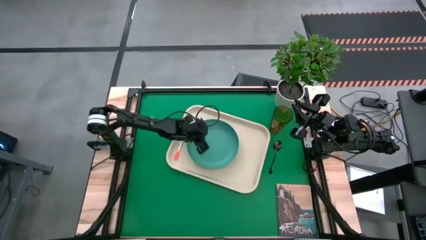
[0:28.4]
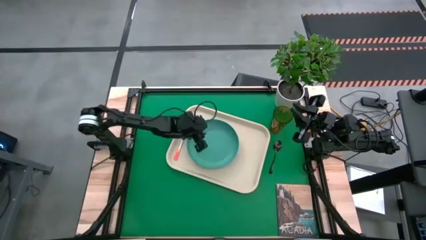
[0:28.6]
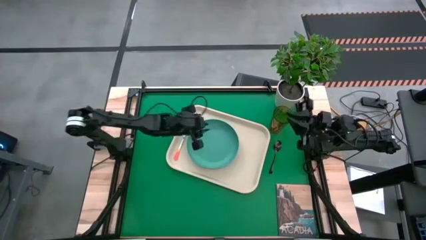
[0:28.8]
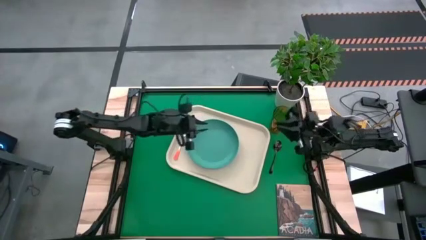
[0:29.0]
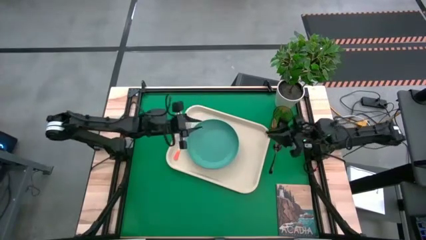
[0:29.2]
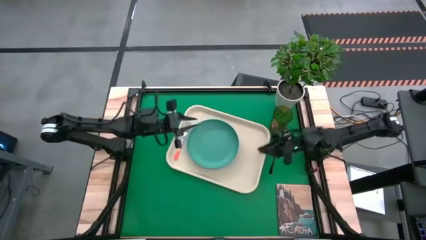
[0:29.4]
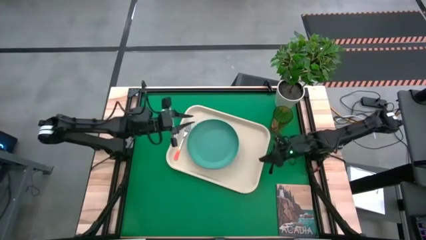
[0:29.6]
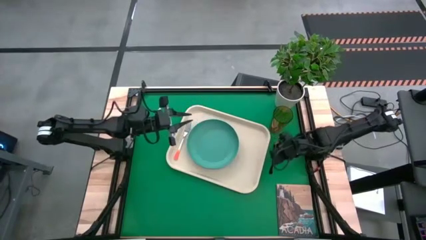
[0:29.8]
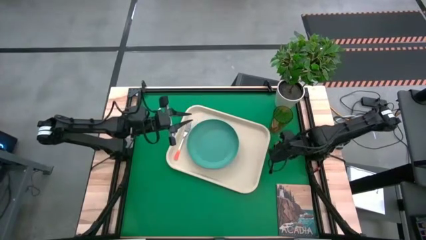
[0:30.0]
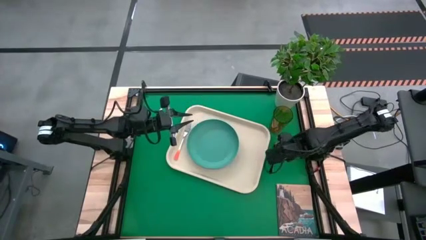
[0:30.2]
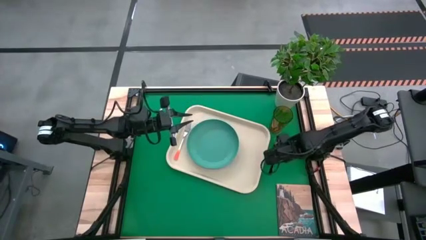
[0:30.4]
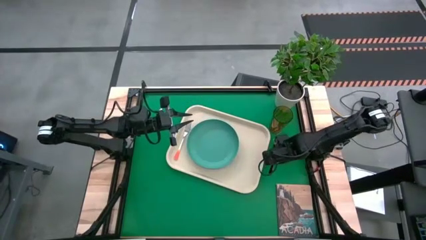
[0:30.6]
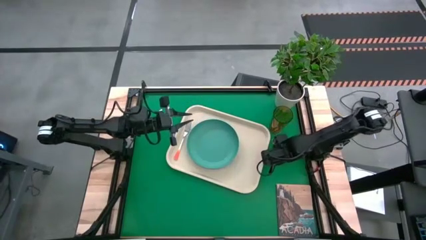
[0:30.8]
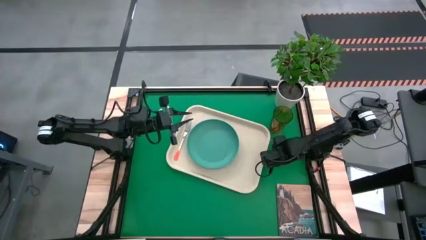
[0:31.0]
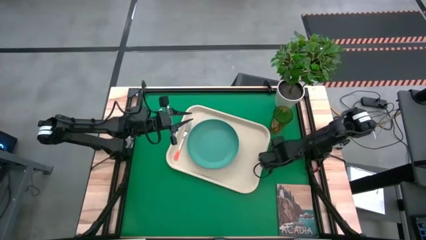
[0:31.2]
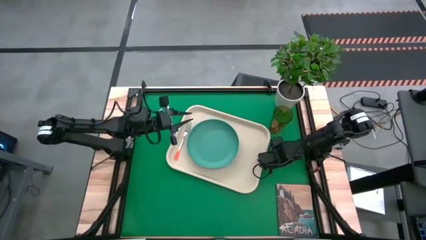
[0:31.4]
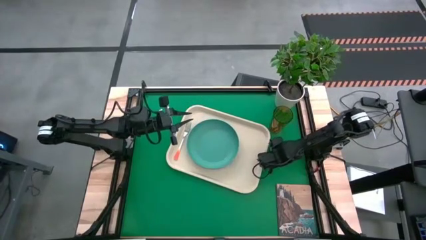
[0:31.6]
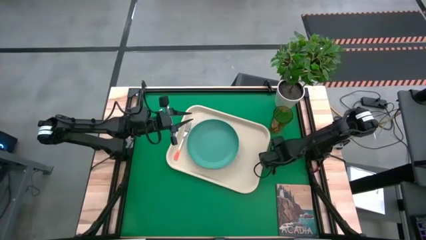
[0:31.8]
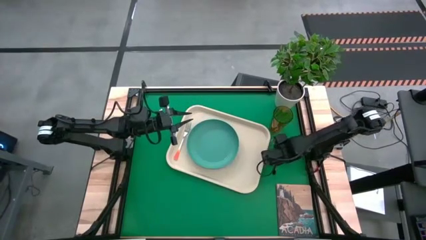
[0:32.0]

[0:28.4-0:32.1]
Task: Pick and place plate/cup/fork/spoon on tray
Put the black spoon on the white tray to the right of the green plate

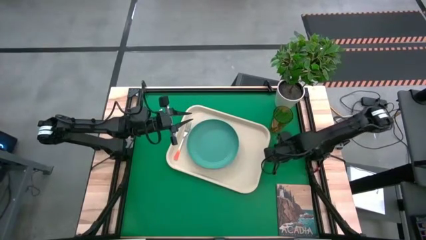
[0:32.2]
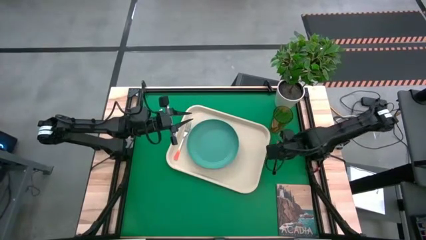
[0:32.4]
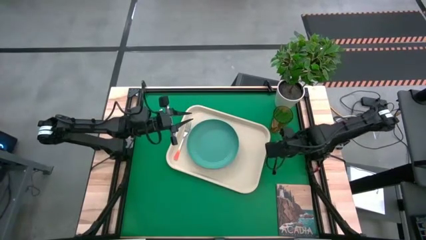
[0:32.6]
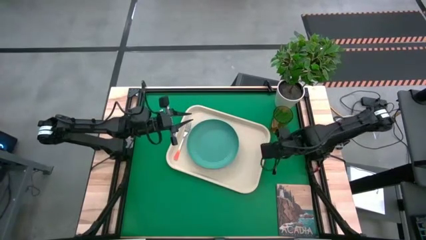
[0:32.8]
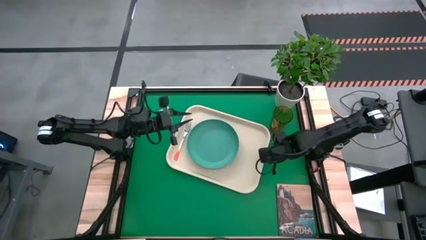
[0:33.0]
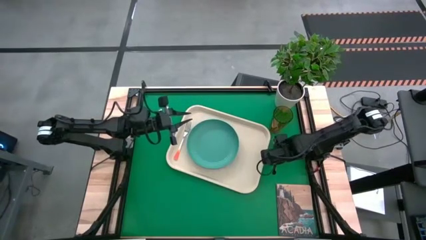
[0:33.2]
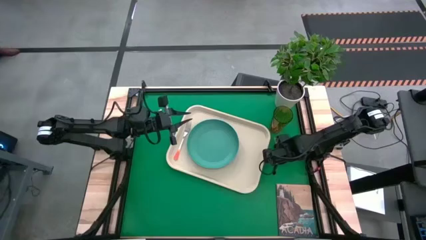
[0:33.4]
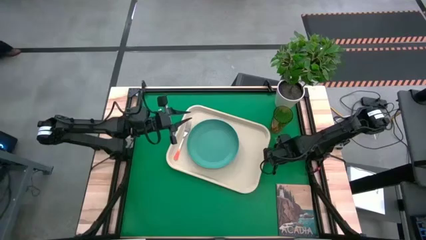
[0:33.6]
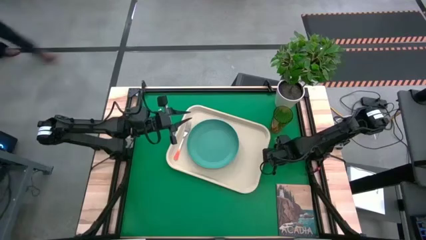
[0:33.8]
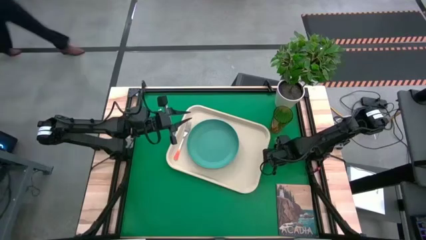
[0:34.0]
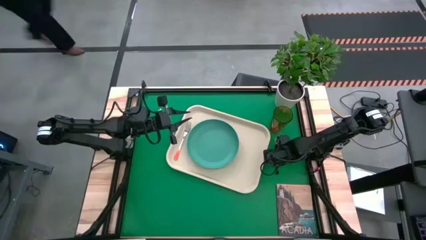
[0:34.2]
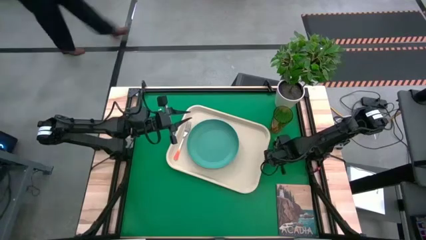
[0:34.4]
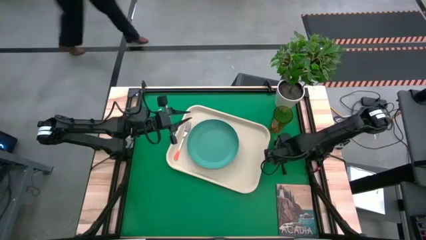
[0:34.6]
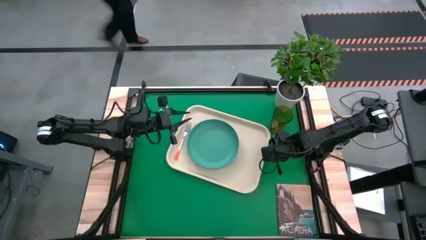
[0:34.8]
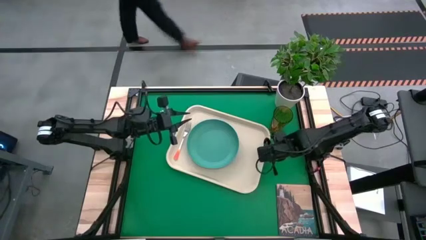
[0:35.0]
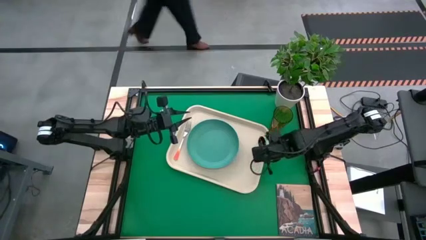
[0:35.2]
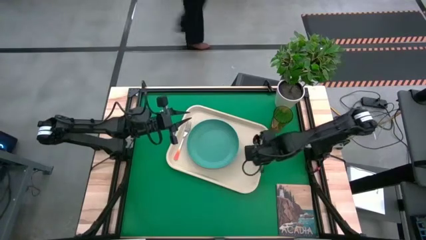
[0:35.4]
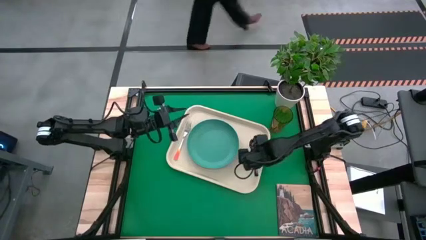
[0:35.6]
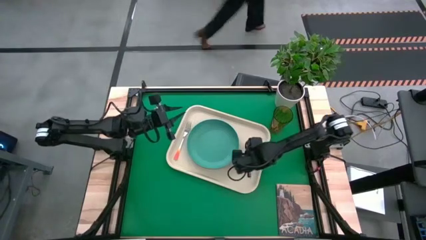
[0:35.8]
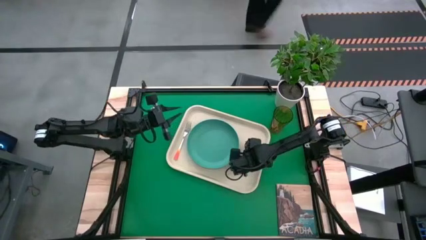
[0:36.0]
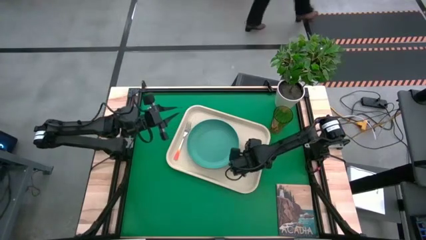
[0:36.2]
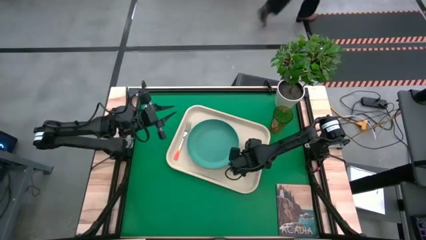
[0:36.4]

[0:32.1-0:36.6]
Put the black spoon on the white tray to the right of the green plate

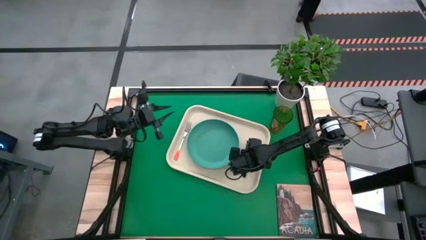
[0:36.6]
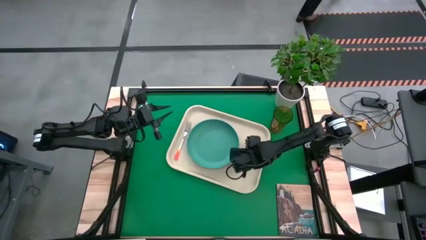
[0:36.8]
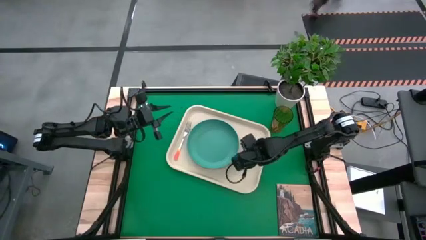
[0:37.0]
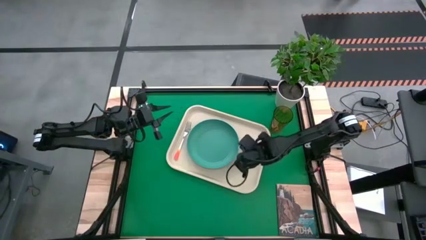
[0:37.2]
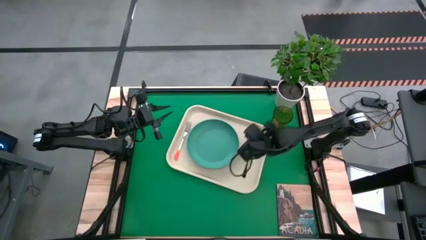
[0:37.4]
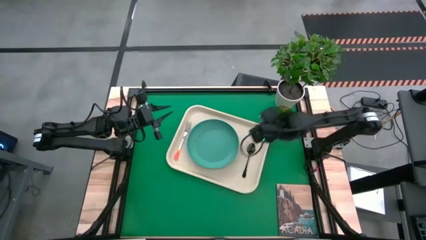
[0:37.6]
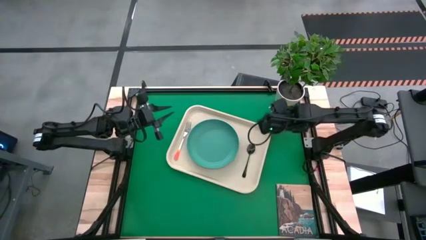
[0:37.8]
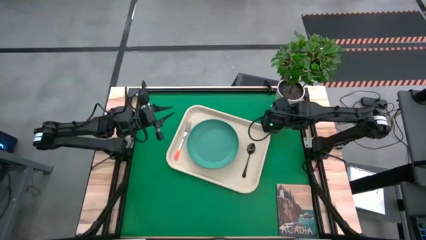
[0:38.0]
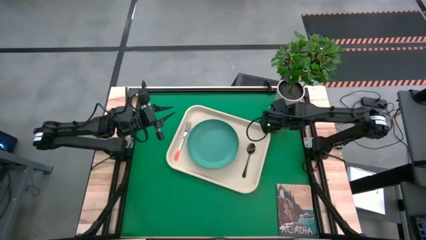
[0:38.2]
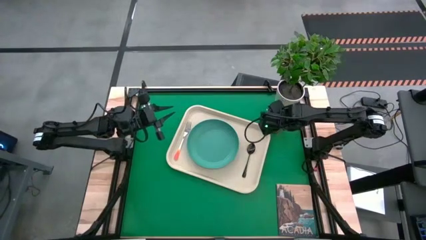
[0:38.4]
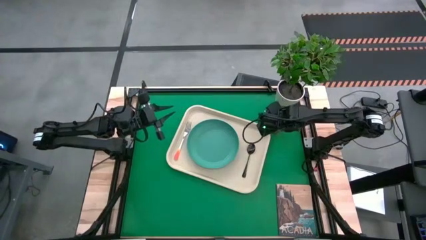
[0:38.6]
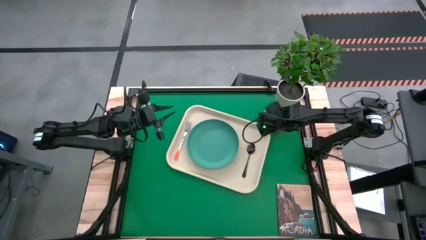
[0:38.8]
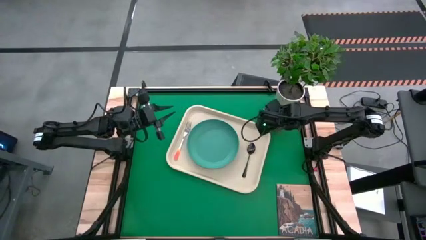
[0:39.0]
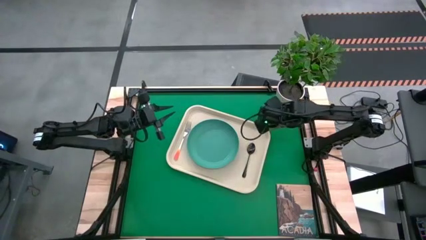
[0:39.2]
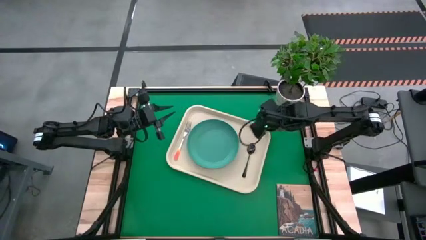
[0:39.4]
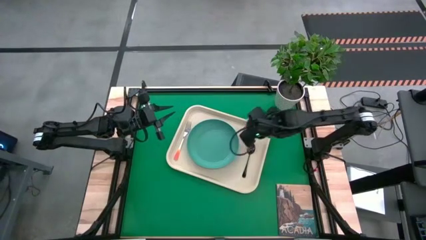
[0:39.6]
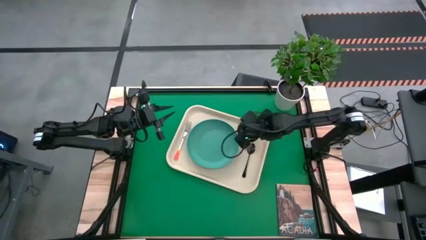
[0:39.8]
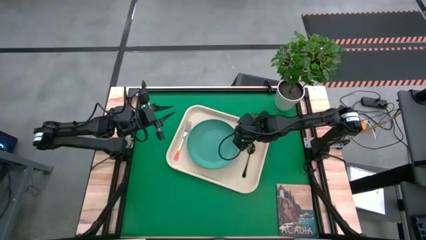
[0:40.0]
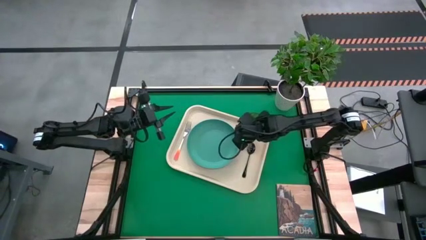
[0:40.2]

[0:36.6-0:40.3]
Put the brown cup on the white tray to the top right of the green plate

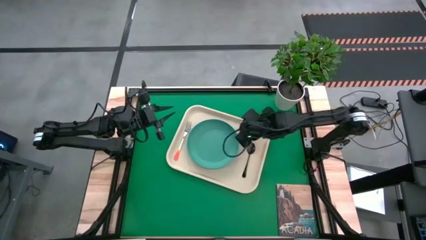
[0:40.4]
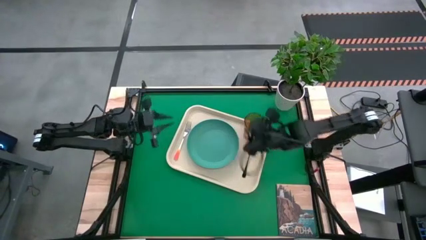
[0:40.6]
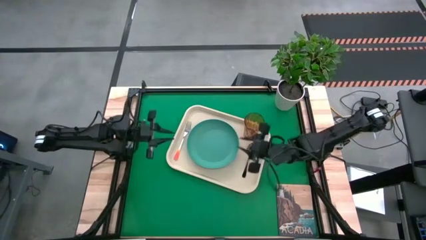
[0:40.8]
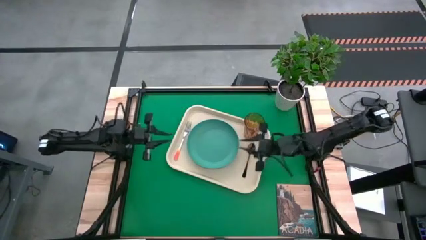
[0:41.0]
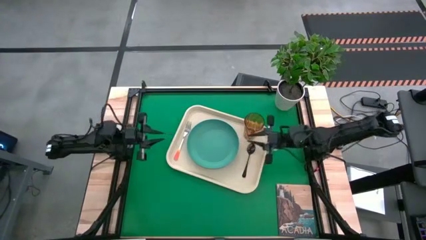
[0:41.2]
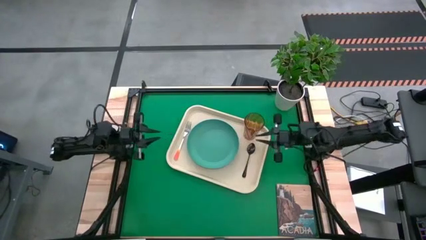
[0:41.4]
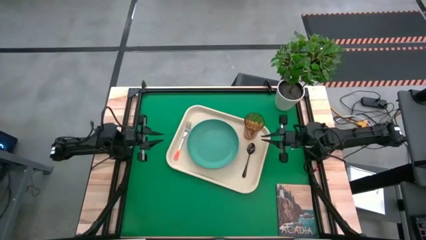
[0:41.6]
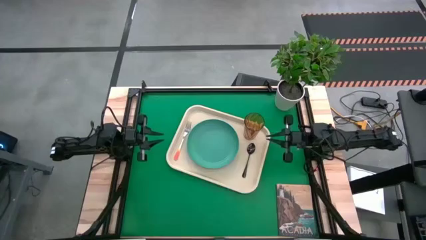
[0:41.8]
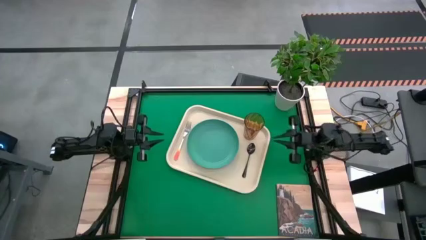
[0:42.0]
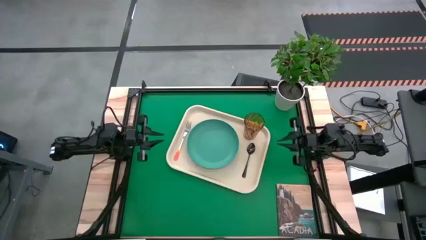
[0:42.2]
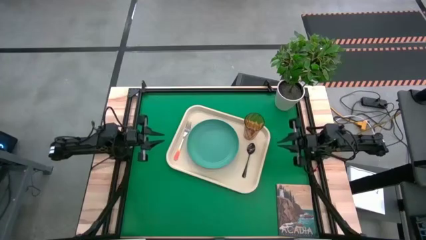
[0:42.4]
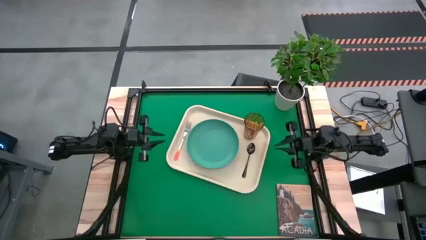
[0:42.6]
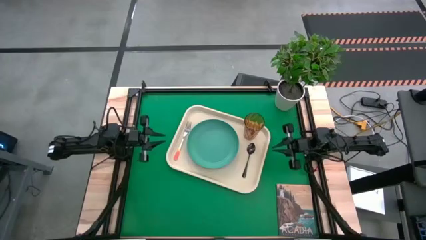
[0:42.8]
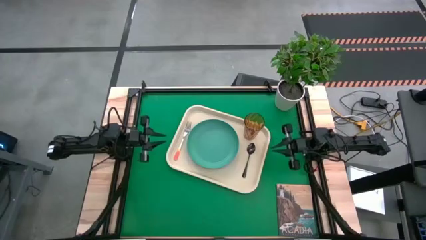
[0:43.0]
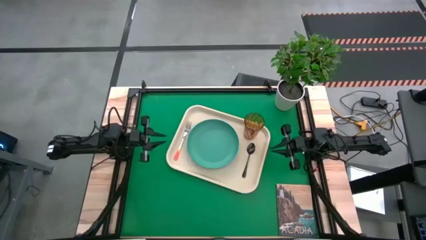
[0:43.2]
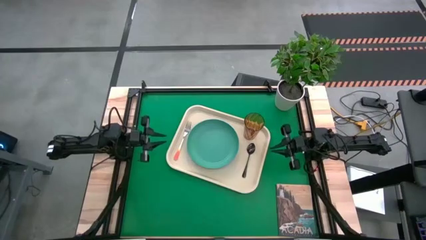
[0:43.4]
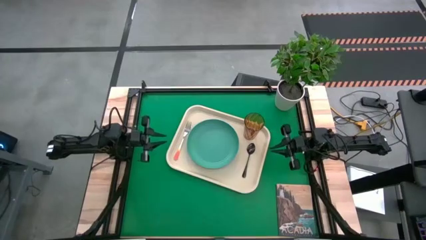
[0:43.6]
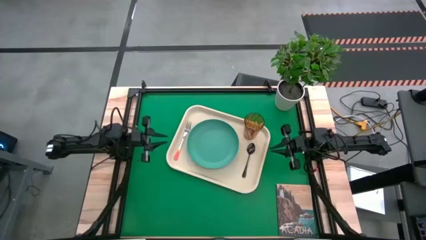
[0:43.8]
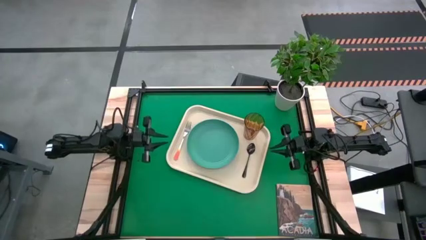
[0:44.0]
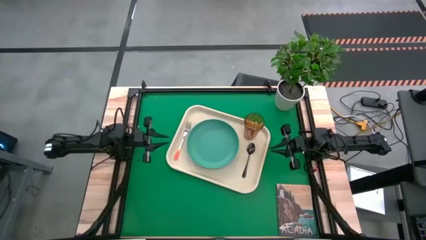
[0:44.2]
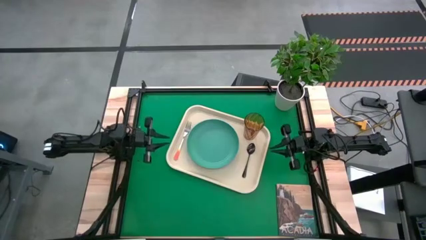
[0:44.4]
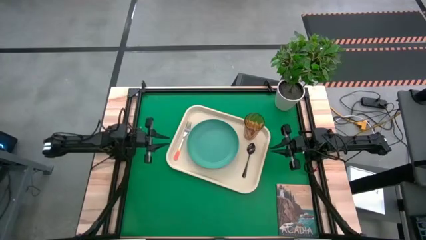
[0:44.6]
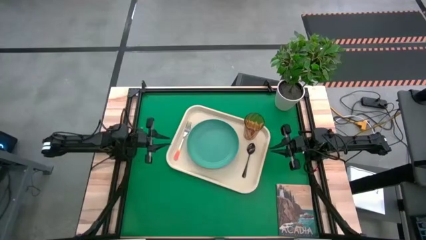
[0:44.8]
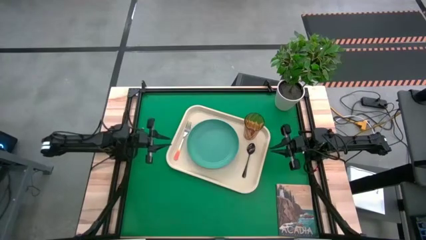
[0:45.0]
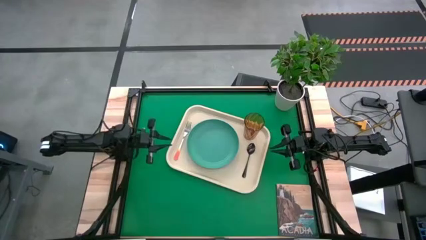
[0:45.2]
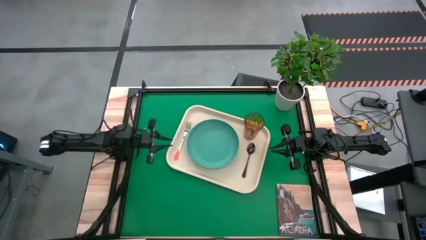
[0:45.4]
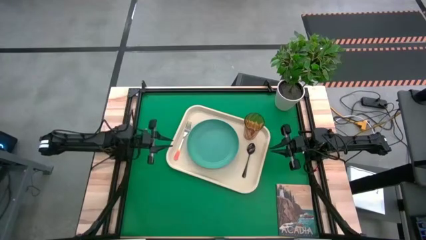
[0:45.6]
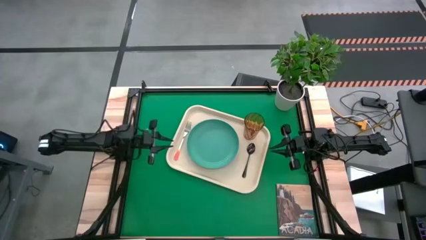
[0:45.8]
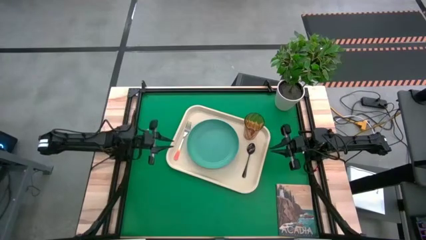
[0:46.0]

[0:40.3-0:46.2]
Return to Home Position
